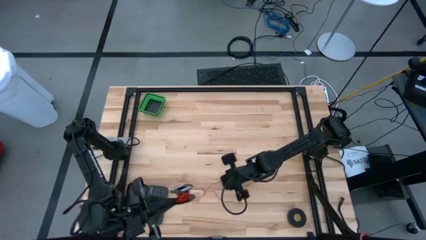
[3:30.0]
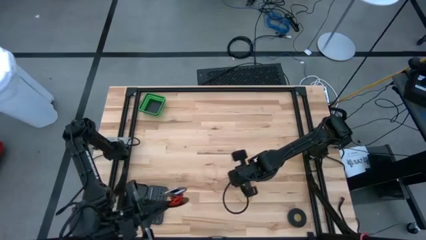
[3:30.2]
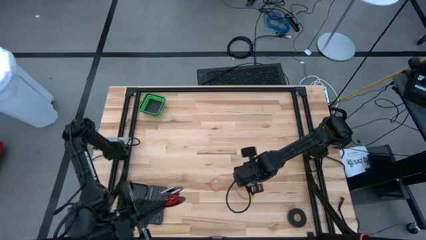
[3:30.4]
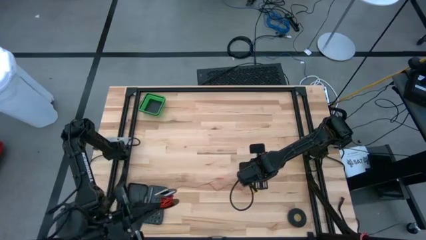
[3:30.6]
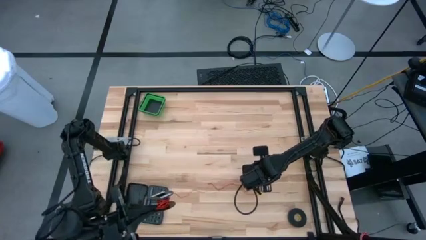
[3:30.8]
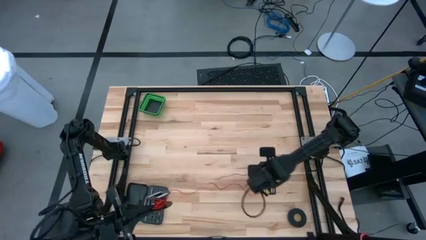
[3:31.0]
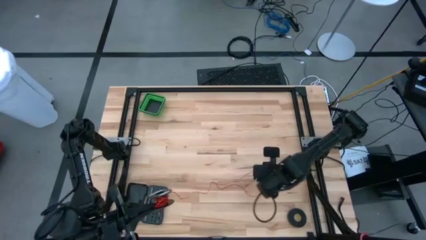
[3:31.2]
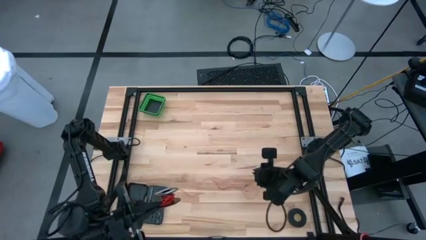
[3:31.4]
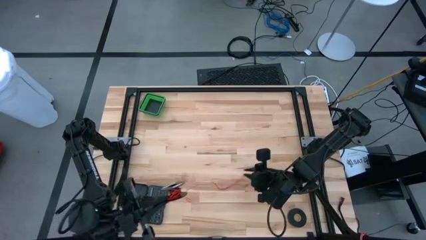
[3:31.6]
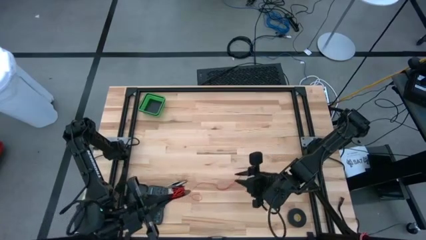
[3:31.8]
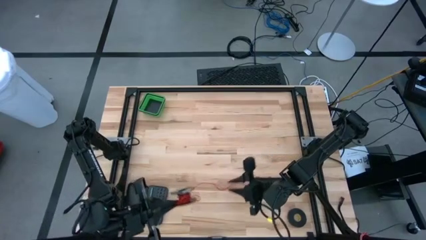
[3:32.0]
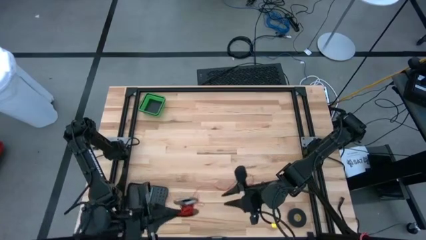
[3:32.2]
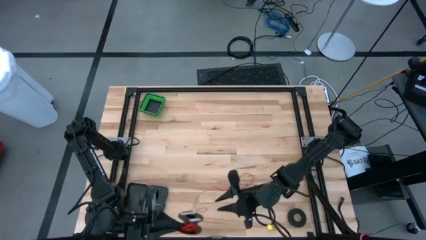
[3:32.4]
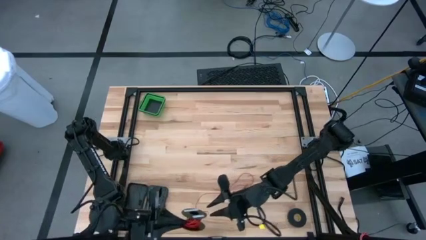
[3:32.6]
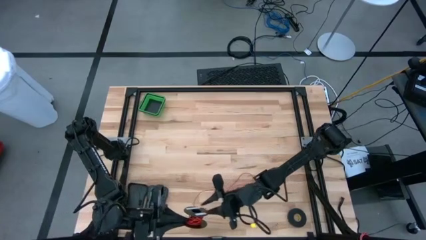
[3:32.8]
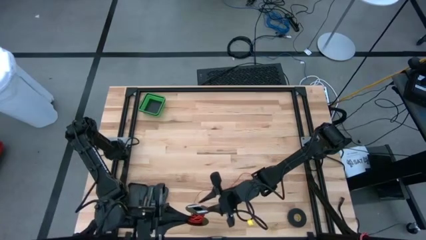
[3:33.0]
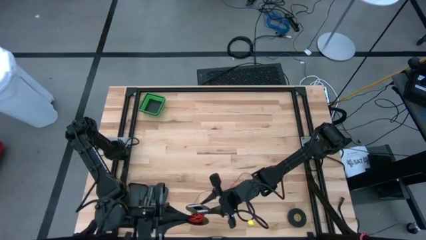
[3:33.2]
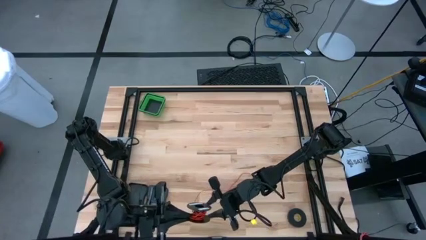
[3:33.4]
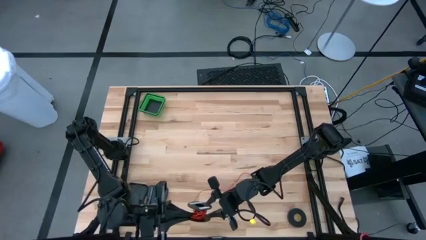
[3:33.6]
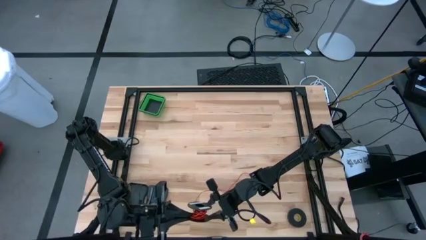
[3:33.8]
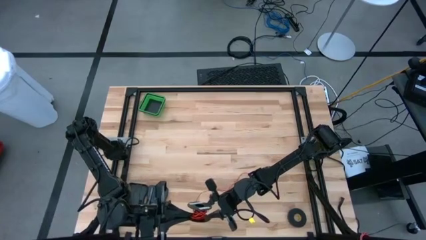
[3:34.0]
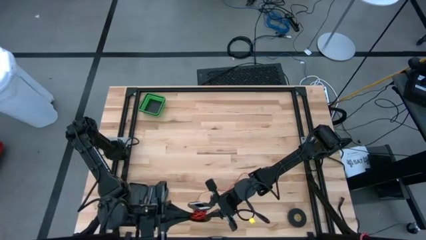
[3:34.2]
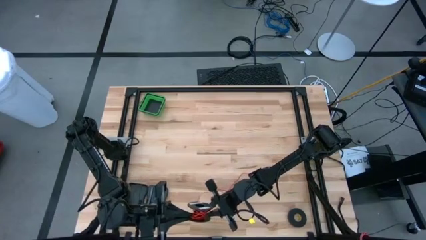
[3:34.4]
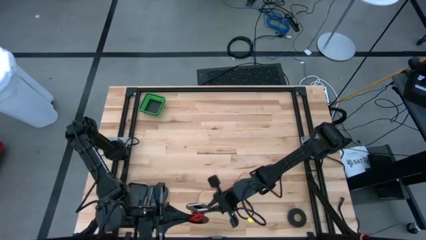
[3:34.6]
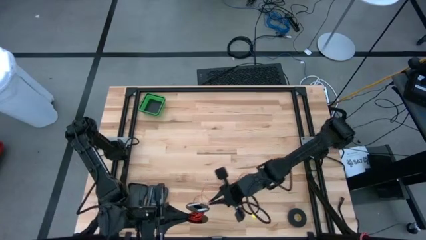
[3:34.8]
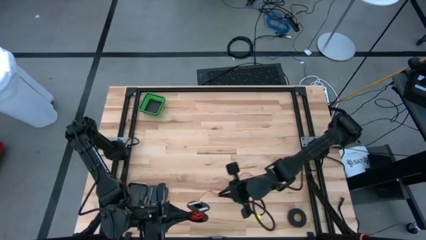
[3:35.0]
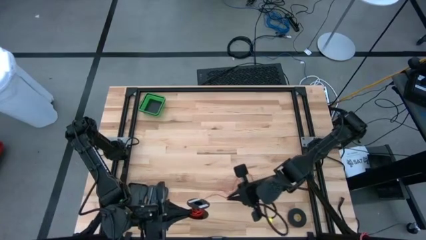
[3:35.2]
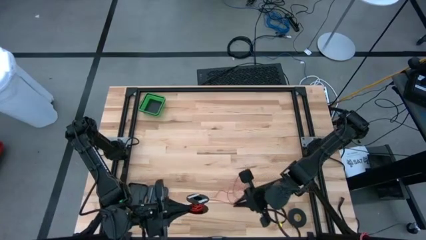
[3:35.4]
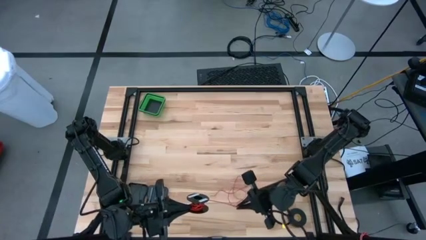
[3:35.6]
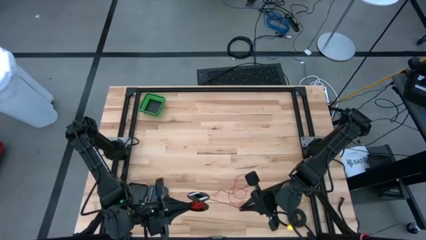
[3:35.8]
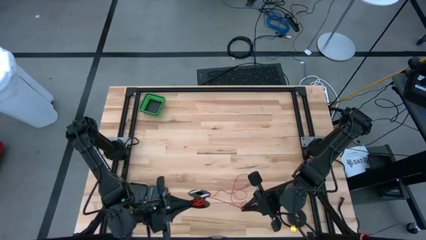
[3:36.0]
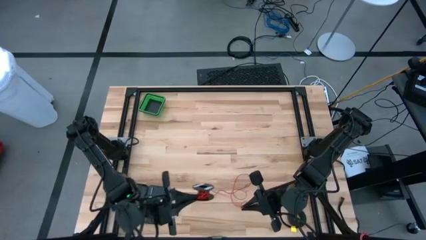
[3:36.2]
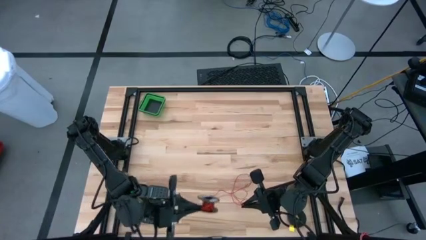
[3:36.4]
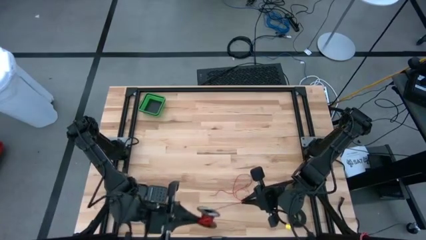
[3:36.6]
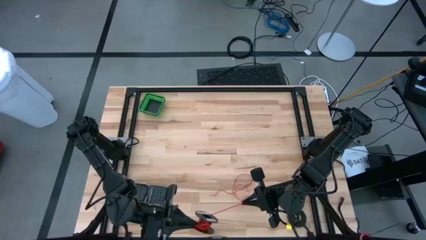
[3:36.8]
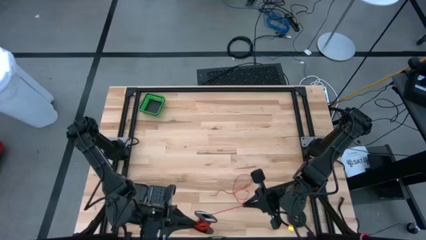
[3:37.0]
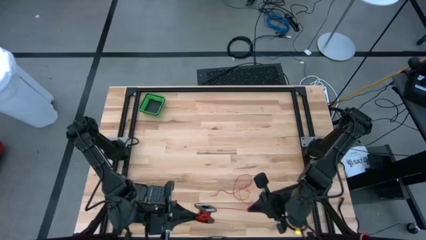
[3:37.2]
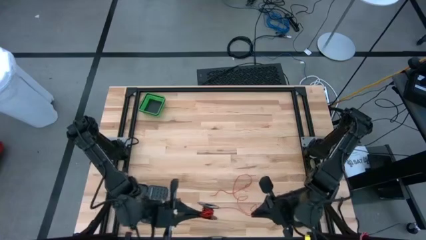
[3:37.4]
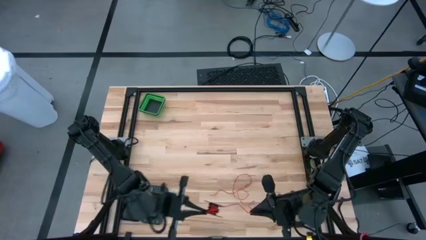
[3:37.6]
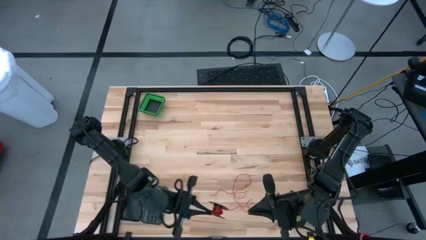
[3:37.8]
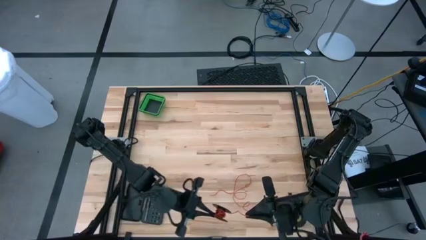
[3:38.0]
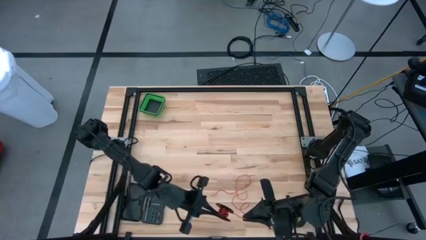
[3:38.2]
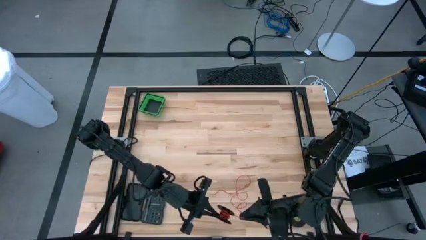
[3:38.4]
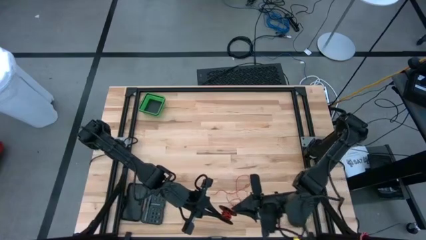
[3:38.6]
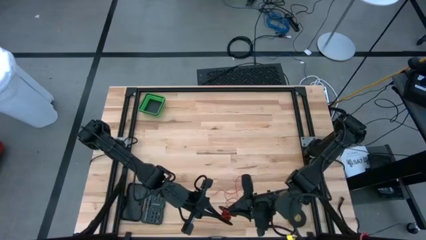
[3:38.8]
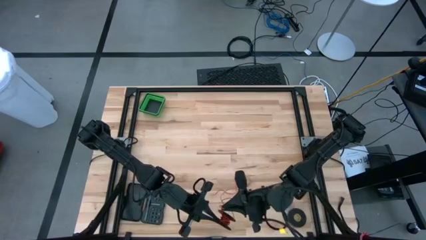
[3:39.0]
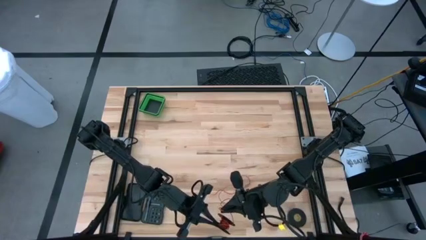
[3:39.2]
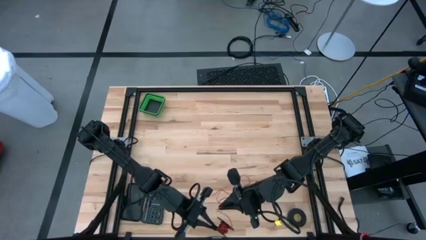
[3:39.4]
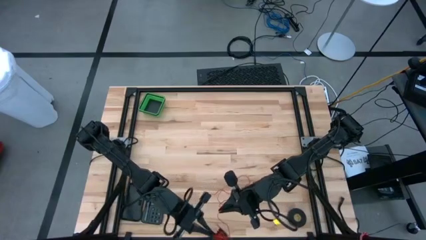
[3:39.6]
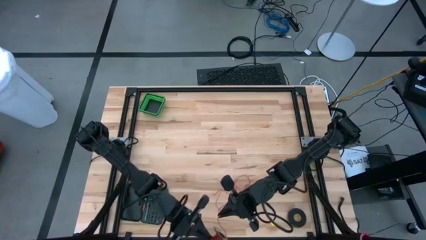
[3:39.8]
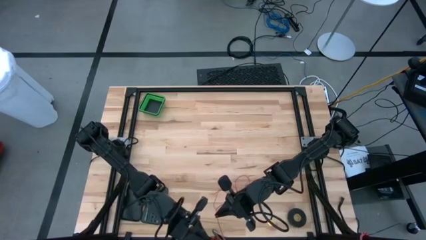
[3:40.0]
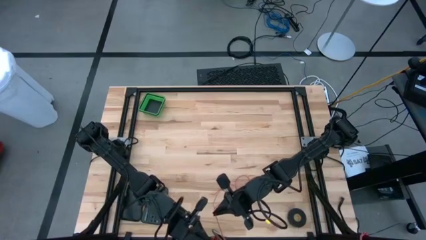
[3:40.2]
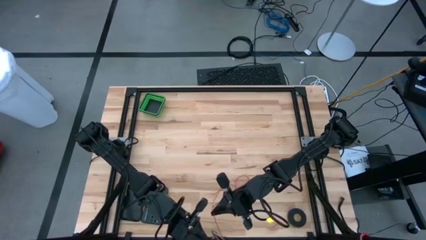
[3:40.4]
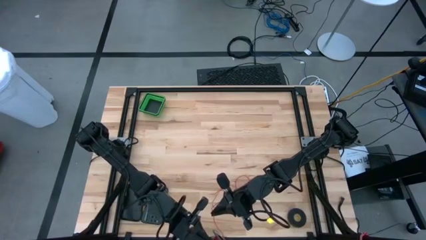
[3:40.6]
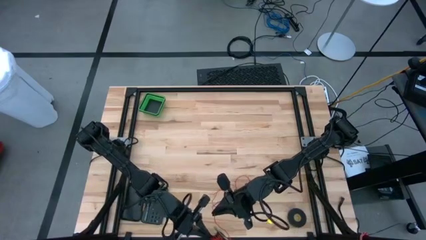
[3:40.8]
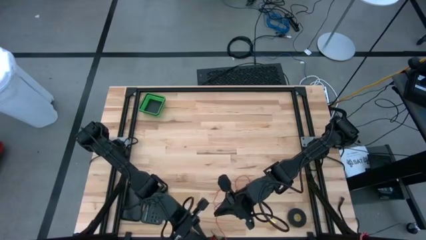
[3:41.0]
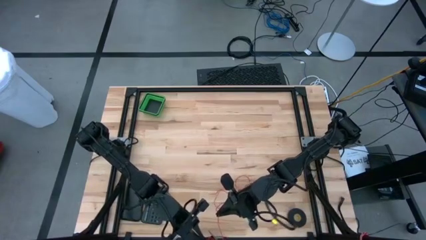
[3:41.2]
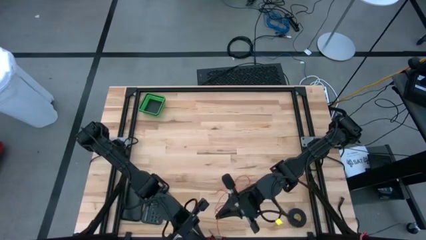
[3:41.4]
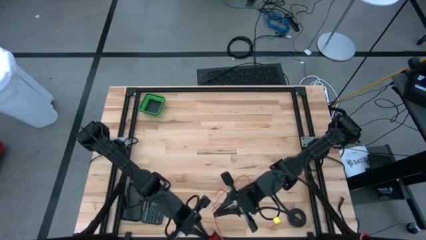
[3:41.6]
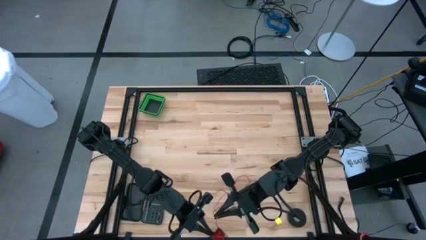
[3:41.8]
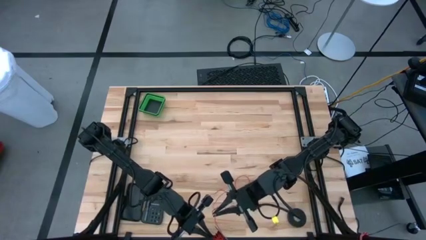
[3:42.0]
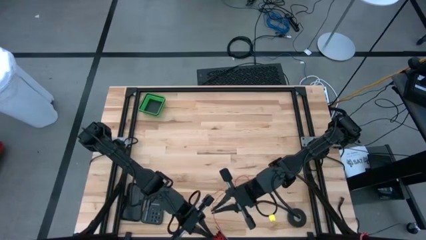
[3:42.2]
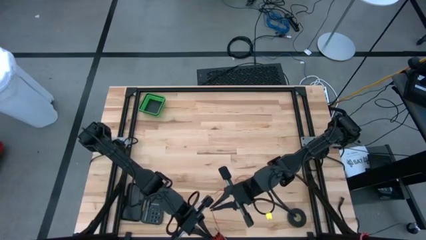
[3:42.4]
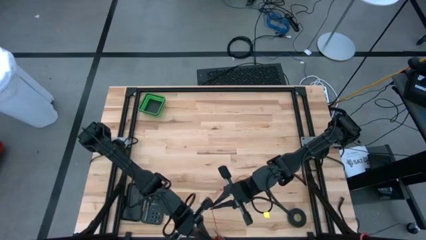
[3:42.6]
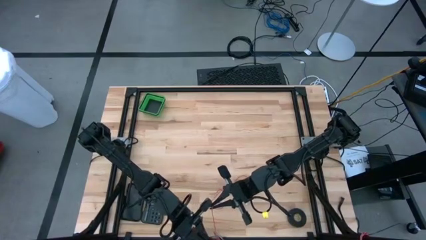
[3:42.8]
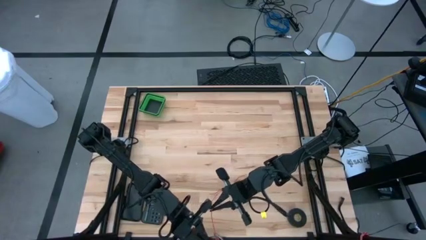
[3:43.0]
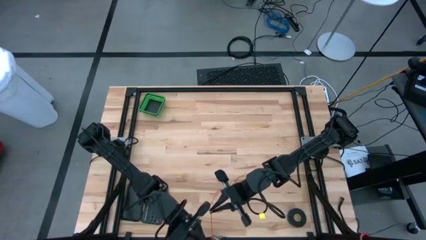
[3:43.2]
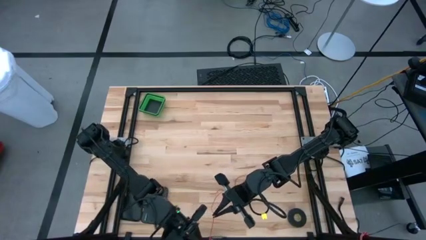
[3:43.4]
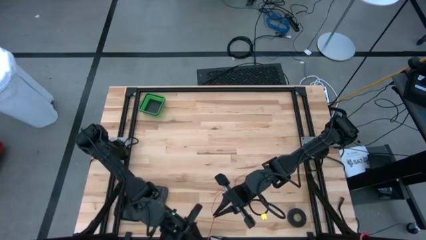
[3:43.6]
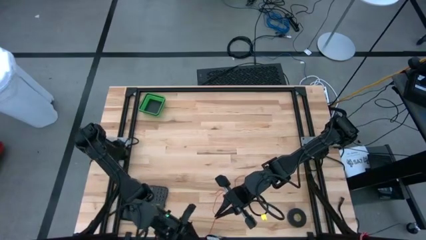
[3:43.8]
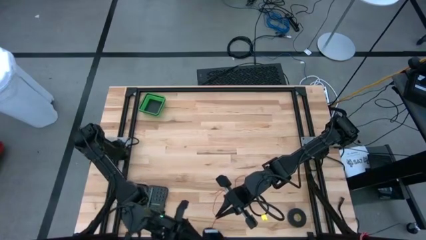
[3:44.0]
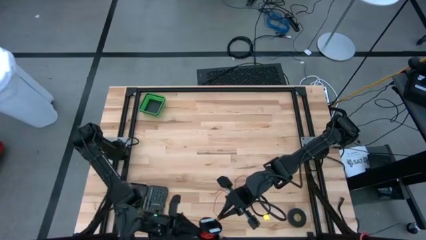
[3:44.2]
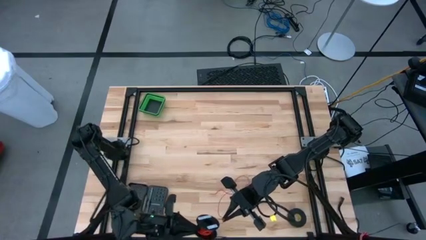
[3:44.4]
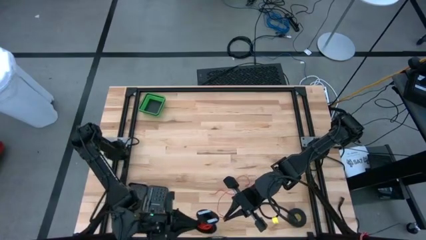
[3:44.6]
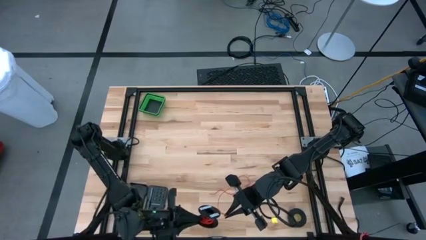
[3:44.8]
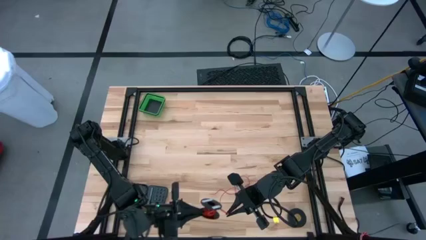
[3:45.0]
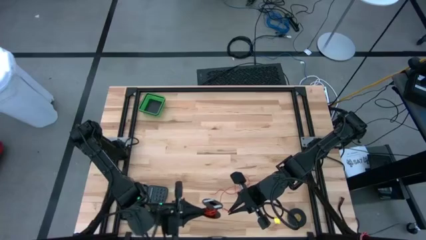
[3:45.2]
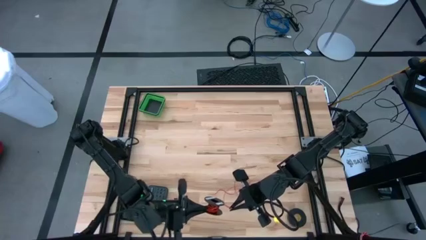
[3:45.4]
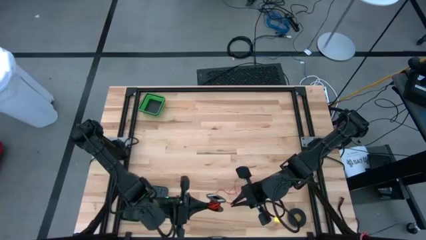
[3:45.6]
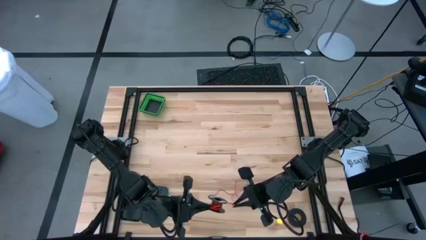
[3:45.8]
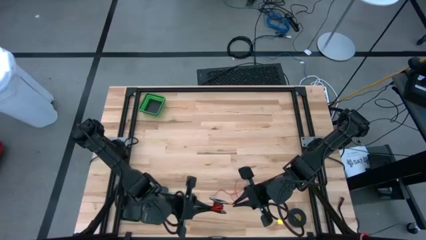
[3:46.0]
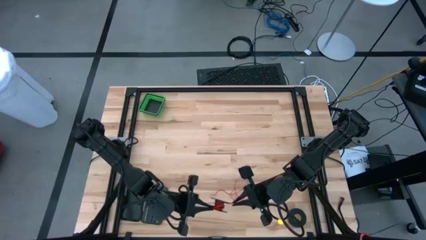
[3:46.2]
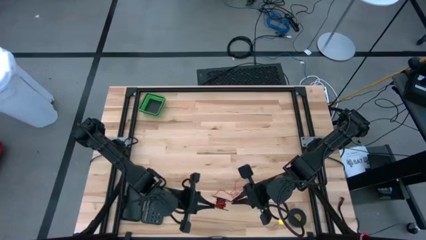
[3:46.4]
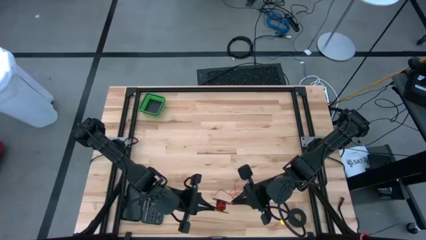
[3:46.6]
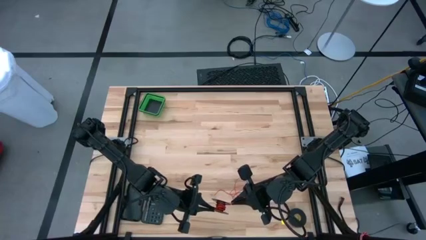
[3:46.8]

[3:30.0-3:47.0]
Task: Coil cords
Coil the red wire into the spool
